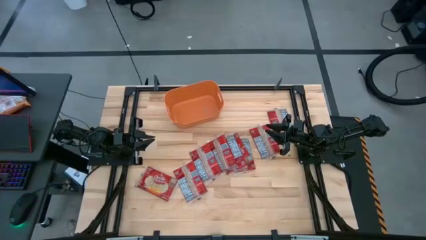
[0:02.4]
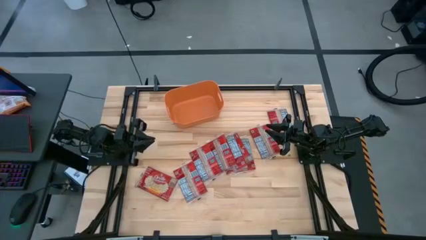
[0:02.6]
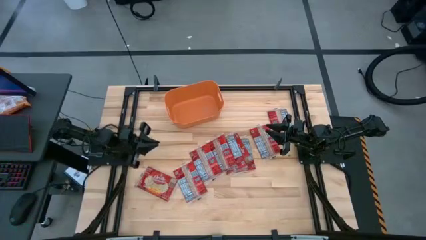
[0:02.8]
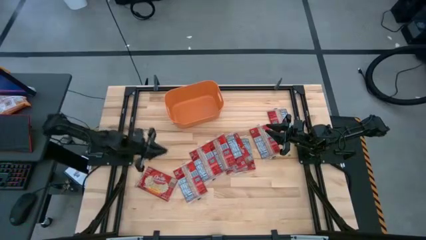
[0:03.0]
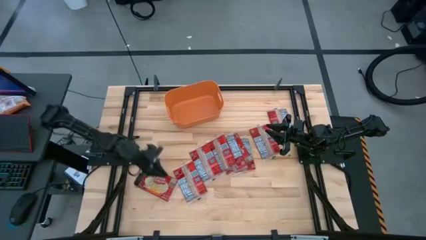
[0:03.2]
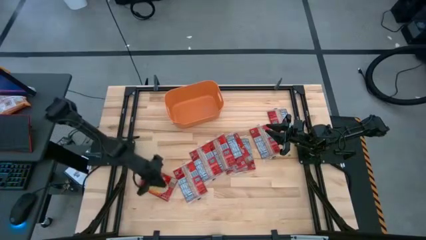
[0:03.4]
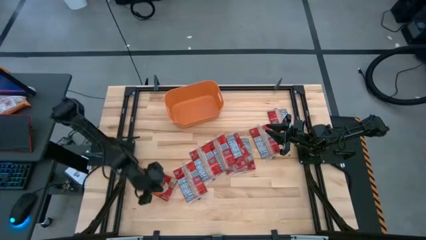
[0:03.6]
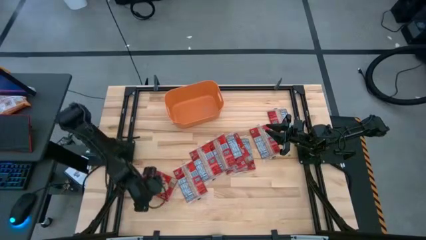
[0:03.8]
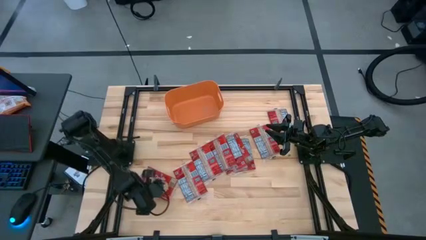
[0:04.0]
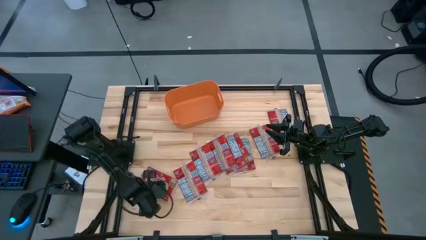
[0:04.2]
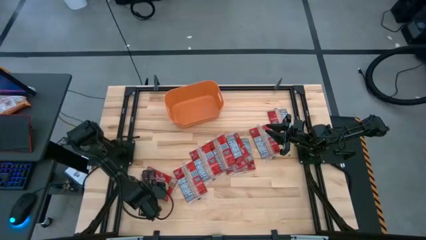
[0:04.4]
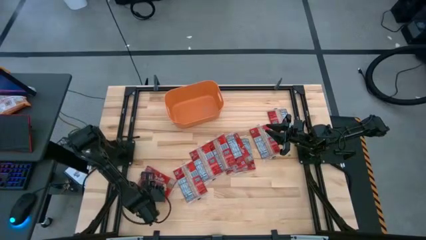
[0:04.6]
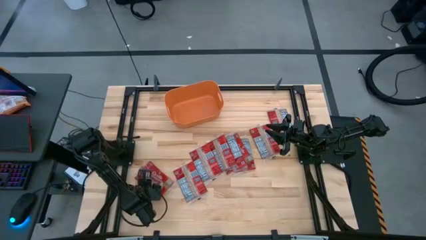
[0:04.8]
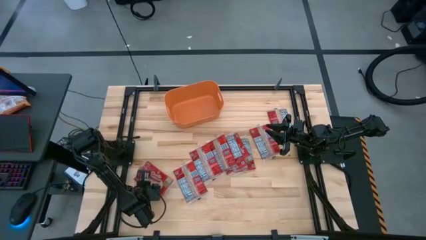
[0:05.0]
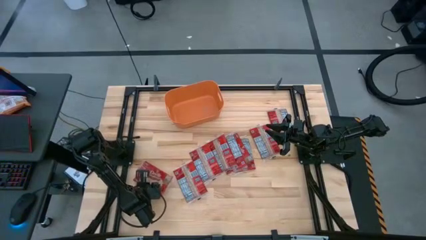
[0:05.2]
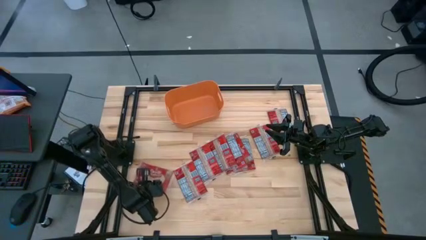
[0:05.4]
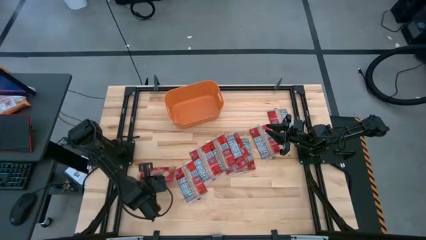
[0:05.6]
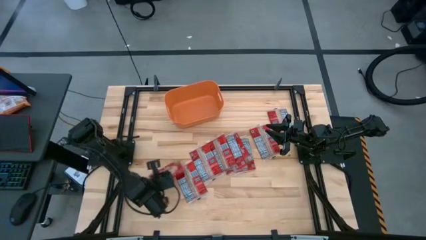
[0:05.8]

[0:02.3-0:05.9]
Task: Sort popcorn bags into baskets
Put the red popcorn bag into the orange bin

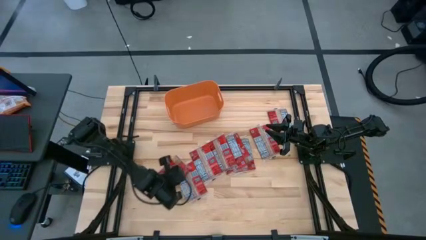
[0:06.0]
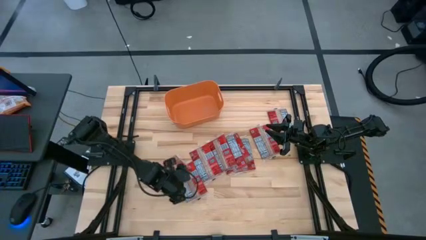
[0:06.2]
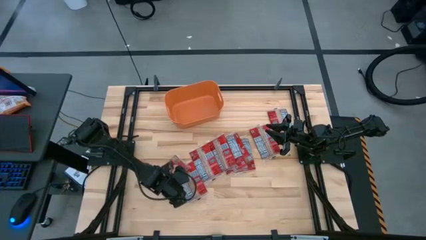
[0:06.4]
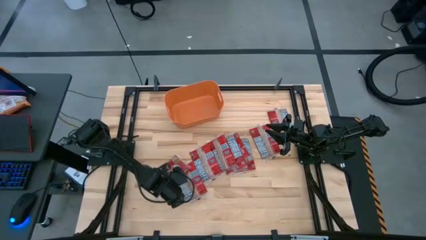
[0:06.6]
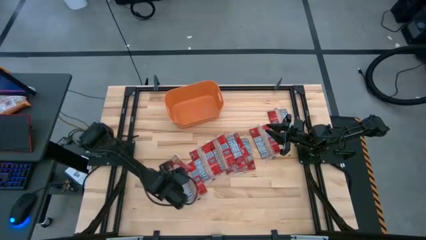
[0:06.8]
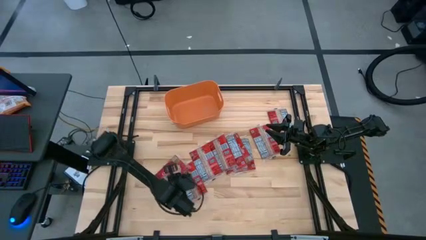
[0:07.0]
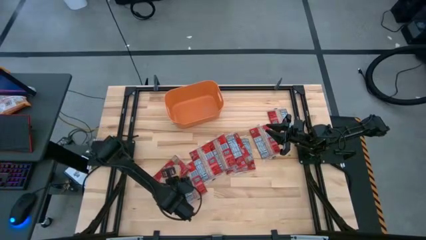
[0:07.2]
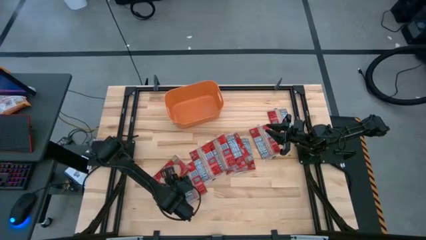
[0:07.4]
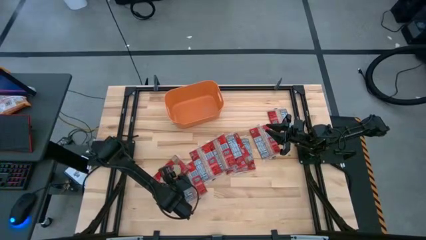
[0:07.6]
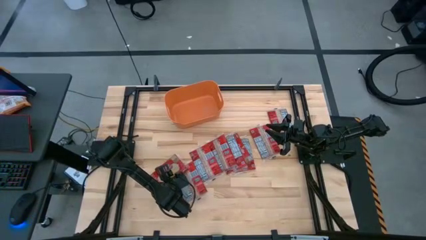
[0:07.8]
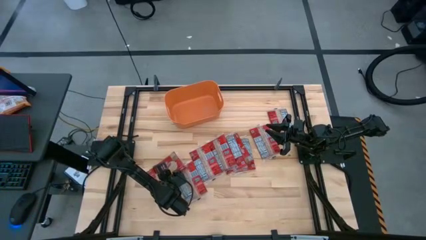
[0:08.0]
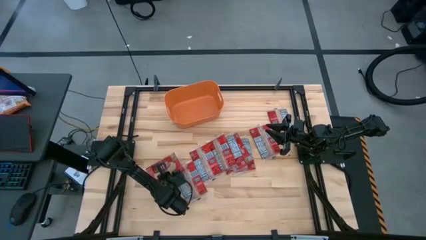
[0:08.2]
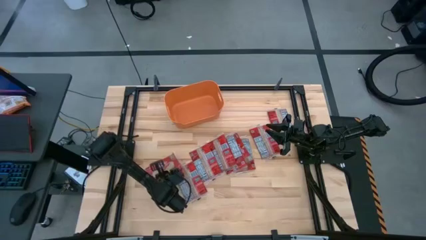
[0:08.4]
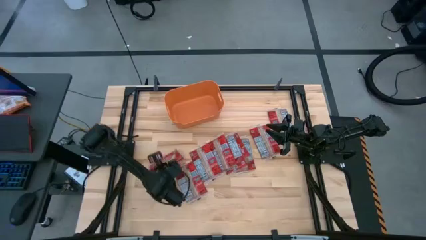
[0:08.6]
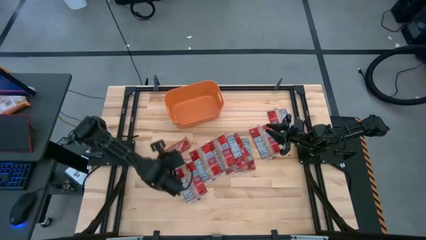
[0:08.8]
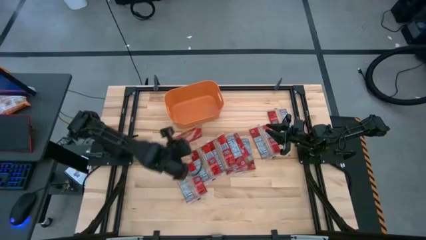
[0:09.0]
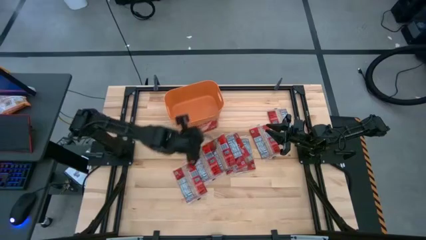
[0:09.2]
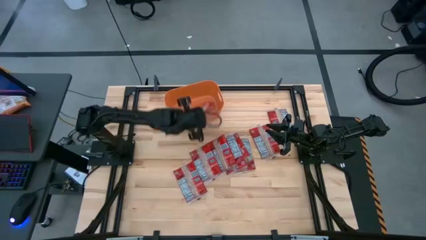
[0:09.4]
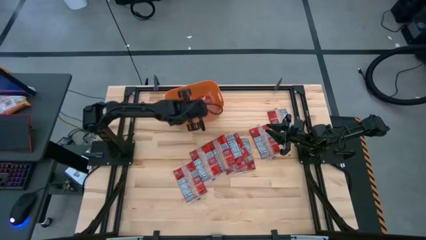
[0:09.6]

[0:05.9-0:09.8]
Put the red popcorn bag into the orange bin

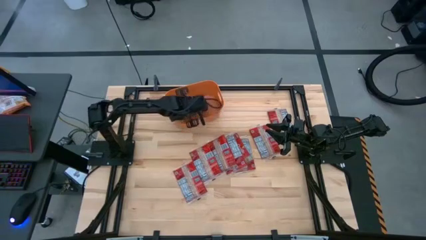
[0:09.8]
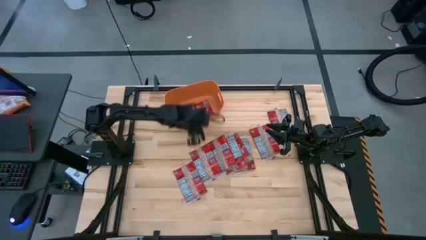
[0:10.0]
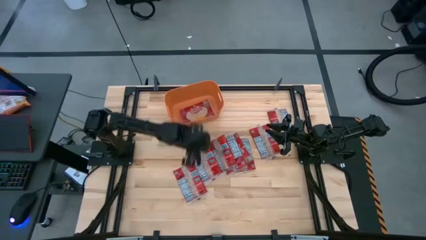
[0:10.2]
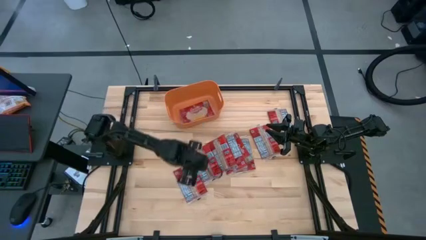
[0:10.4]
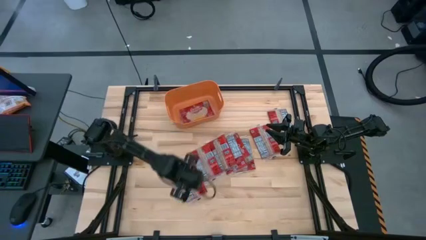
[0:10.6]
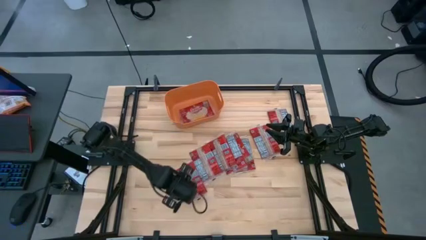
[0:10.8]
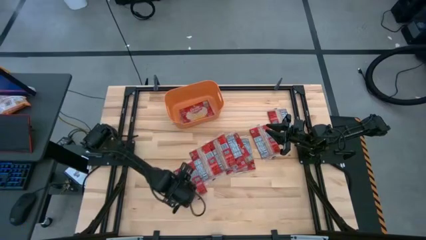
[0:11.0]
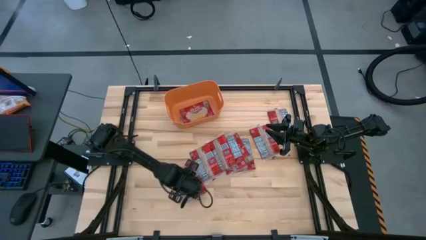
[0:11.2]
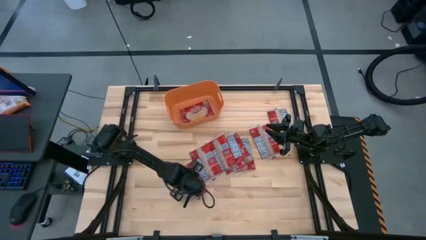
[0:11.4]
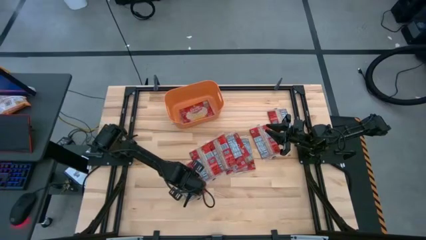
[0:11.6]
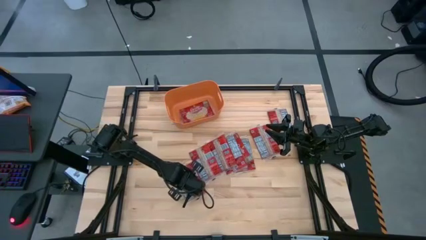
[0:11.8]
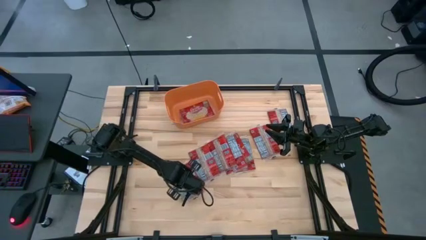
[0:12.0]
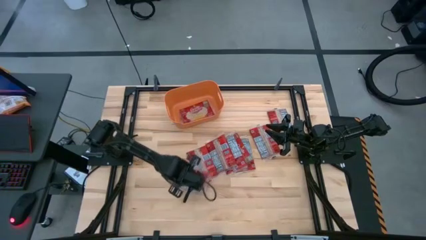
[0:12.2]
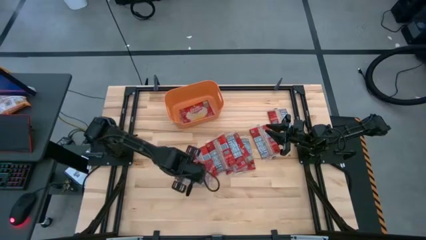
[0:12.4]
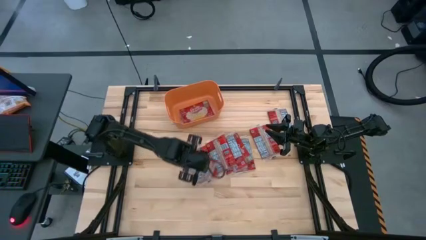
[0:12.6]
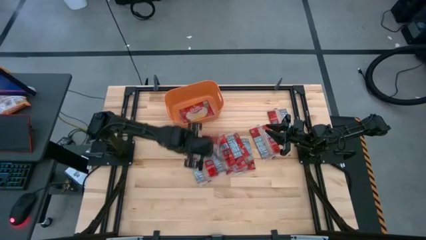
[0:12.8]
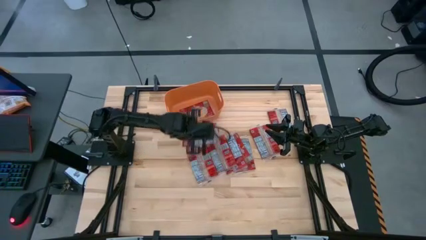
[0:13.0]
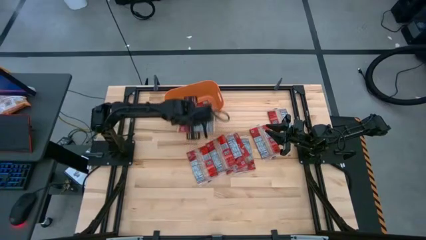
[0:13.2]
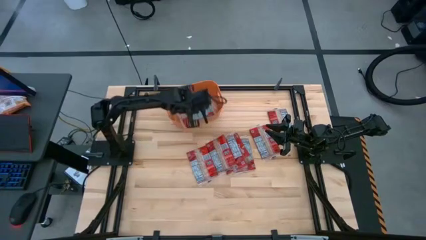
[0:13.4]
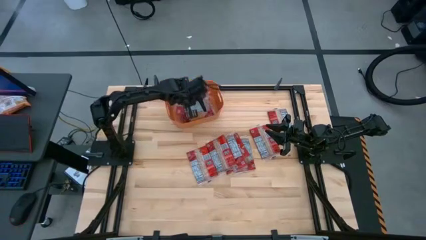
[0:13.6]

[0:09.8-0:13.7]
Put the red popcorn bag into the orange bin

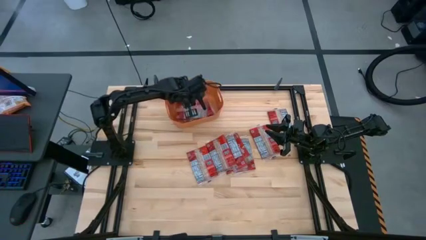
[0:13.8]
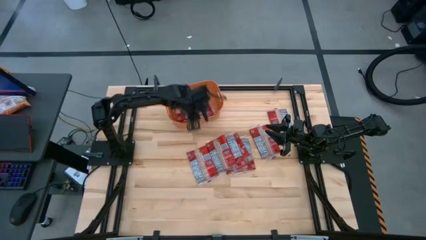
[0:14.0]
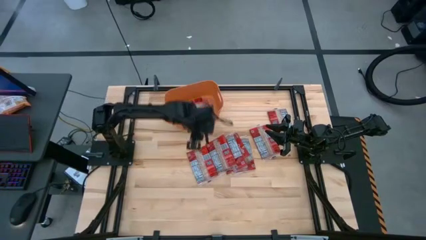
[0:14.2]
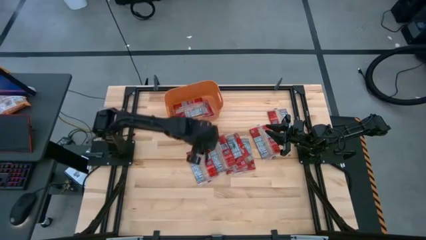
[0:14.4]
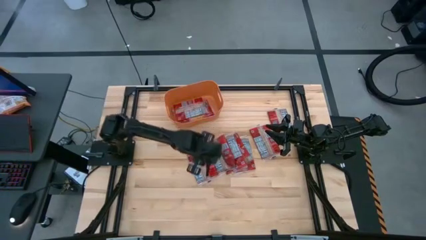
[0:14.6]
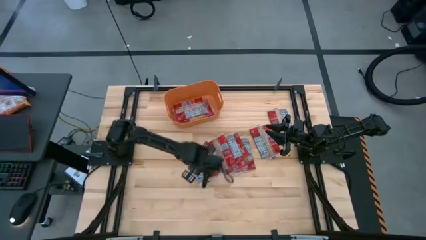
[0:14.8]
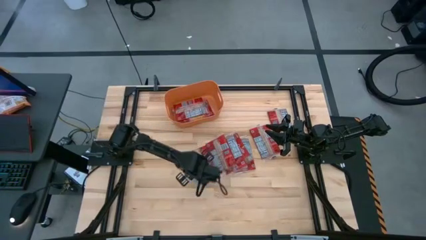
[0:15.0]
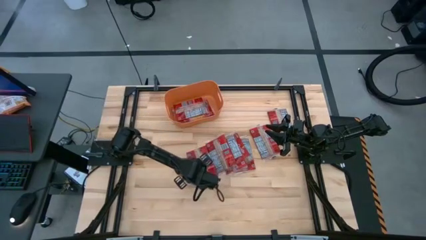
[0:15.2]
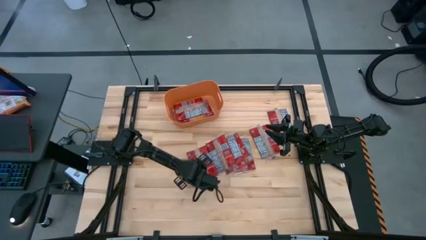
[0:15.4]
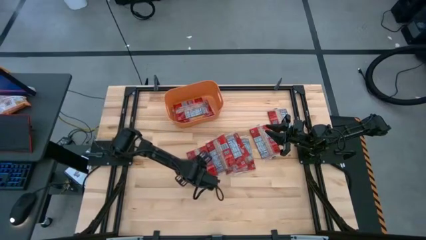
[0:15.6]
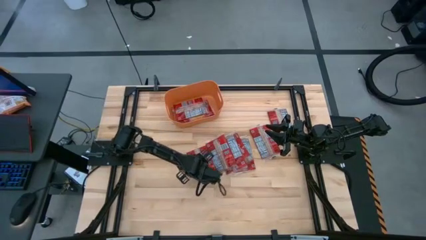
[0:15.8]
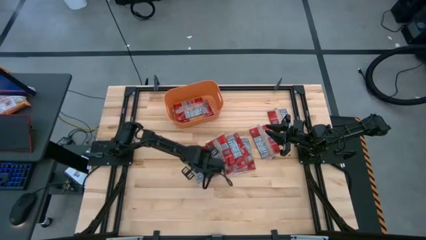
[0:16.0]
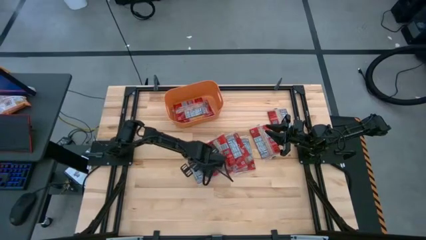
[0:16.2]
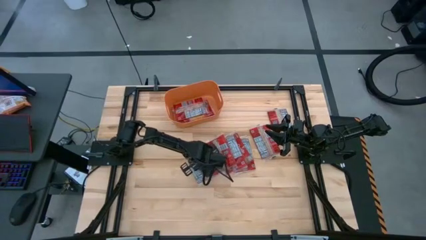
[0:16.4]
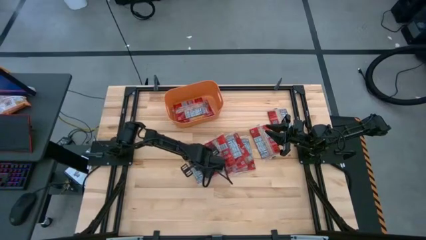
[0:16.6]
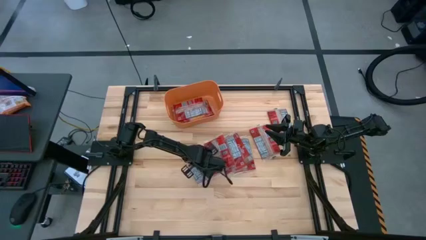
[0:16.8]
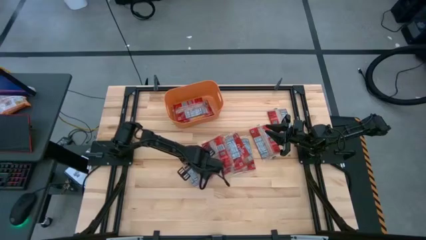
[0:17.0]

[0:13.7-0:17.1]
Put the red popcorn bag into the orange bin

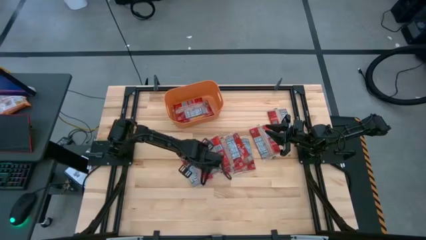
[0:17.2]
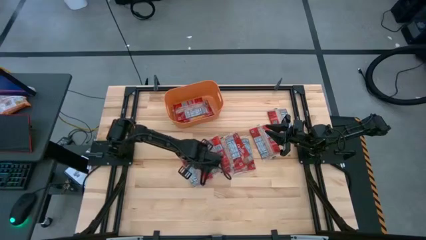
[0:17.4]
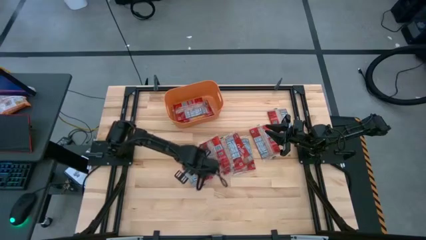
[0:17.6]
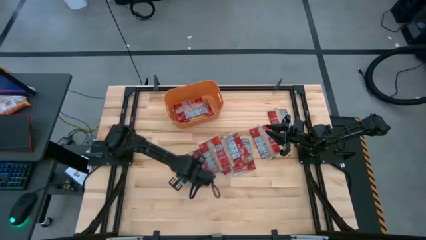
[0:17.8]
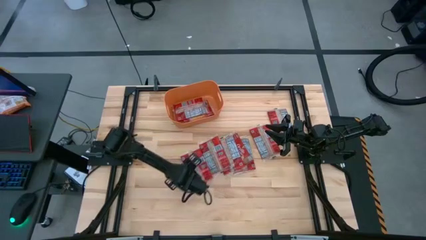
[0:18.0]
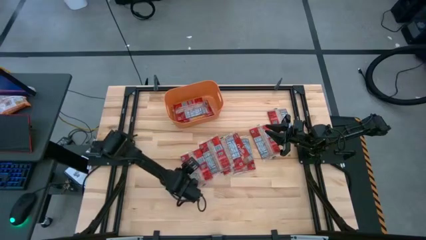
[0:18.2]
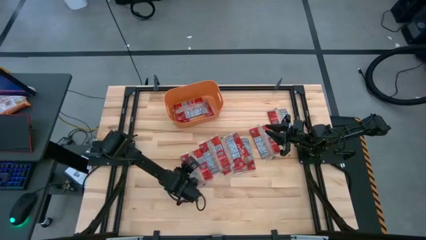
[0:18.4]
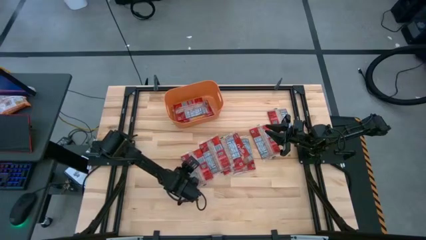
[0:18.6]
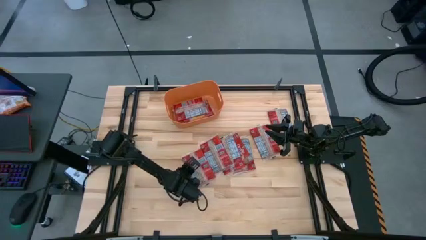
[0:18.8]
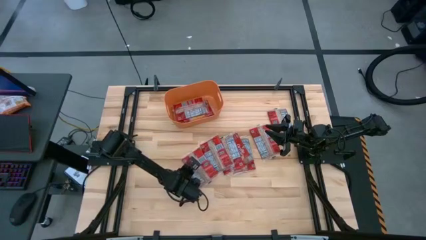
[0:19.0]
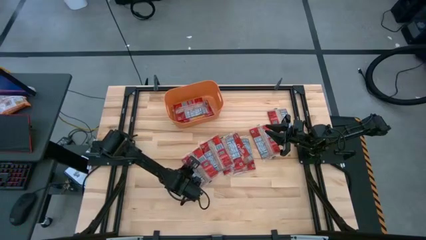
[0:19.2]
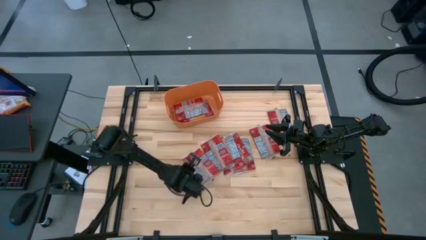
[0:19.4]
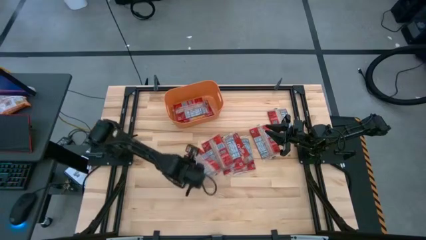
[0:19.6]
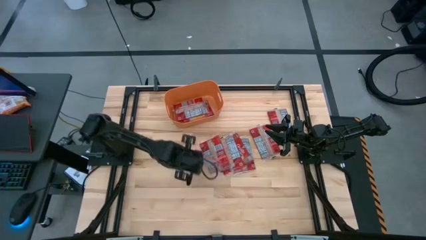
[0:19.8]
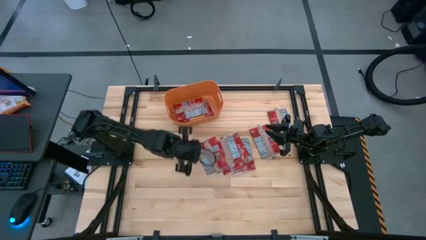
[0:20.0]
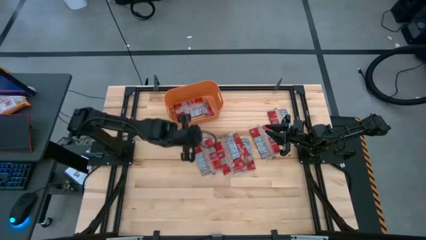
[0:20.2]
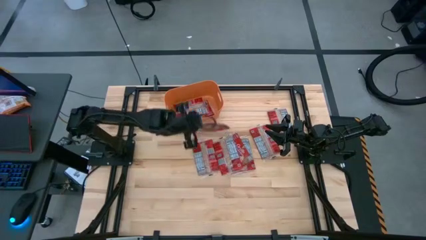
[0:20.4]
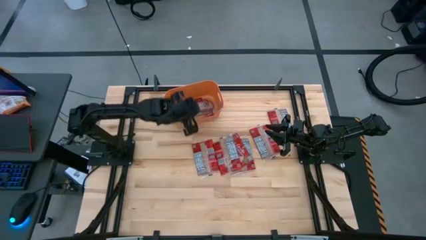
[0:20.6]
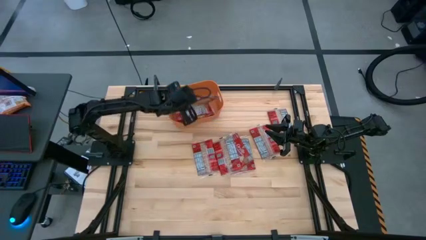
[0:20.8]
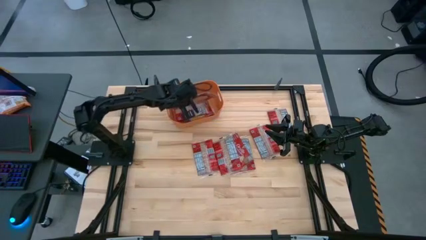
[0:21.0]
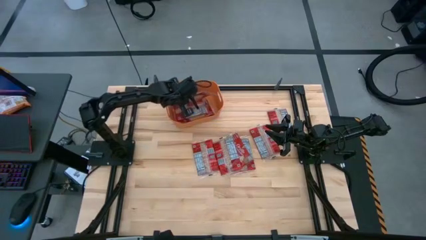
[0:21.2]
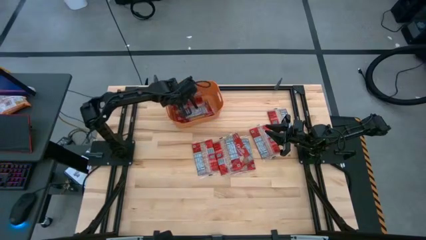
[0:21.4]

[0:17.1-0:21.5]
Put the red popcorn bag into the orange bin
